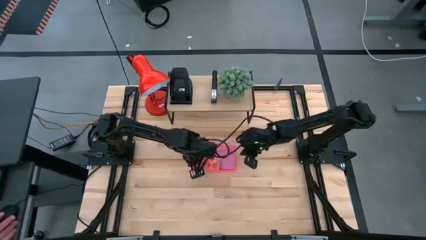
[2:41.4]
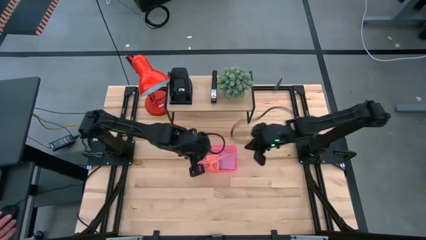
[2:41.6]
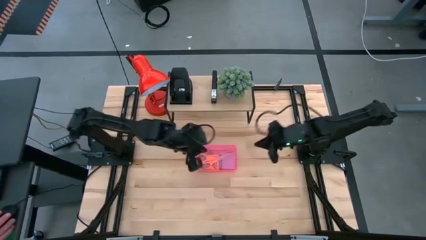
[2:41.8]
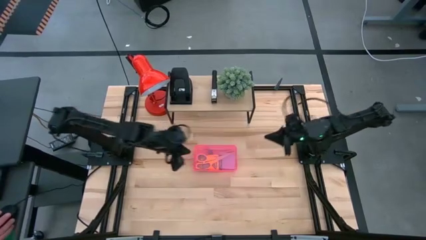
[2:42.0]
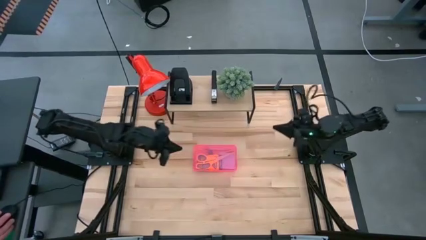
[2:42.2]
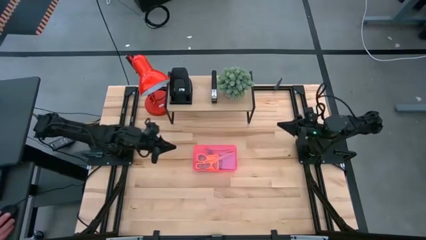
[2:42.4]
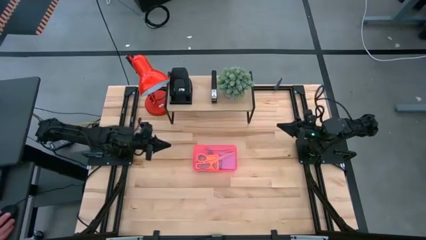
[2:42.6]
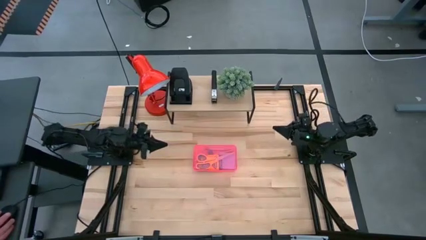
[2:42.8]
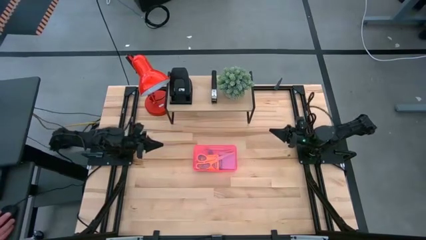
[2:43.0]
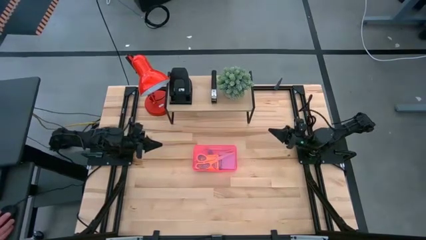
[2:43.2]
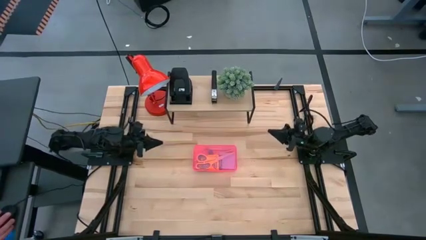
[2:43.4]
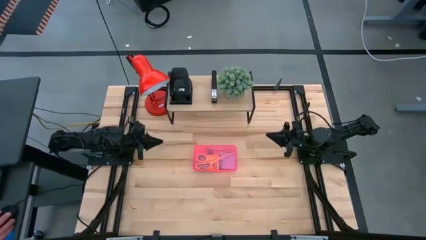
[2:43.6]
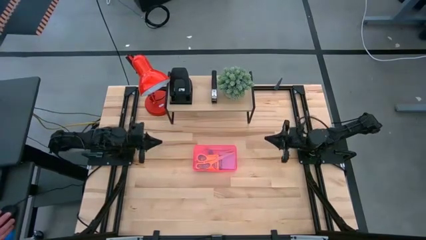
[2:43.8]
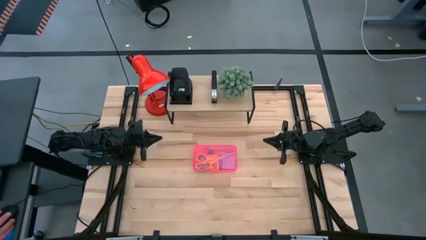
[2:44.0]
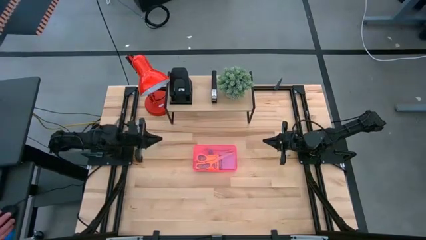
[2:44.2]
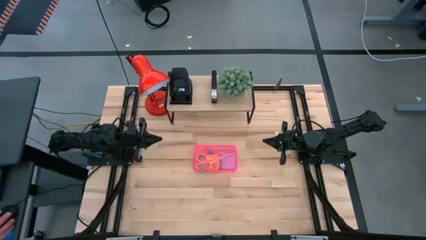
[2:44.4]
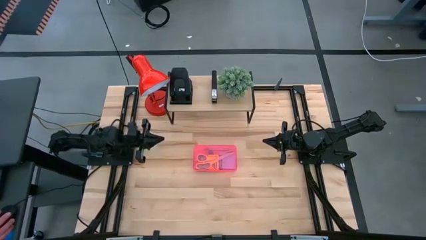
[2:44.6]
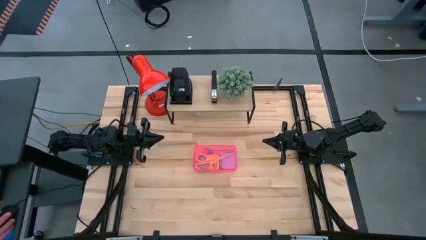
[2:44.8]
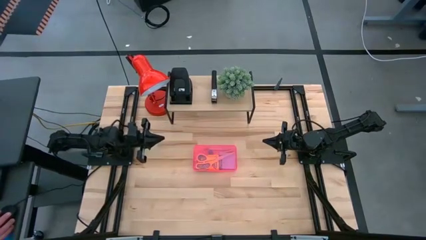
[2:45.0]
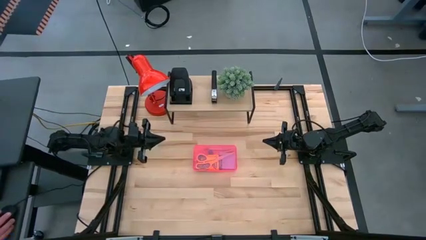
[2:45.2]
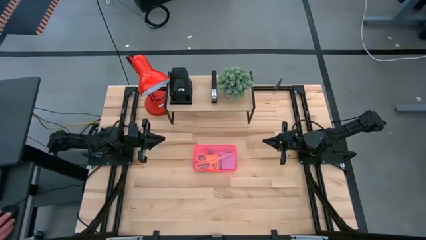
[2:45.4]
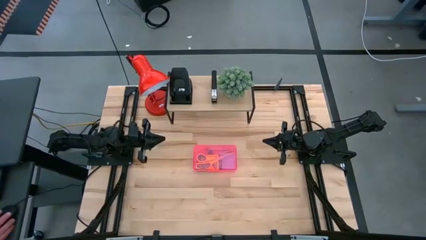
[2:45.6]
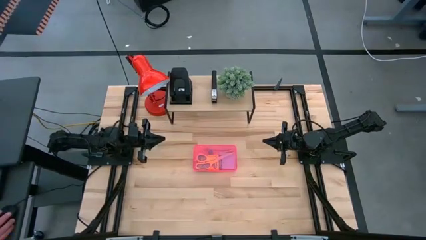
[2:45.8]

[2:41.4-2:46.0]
Task: Pack school essentials
Return to Home Position

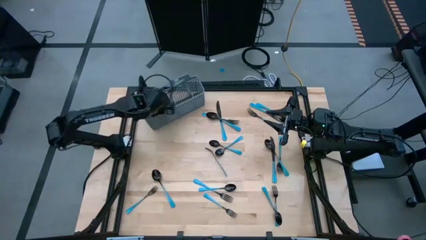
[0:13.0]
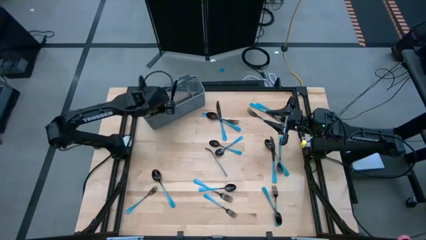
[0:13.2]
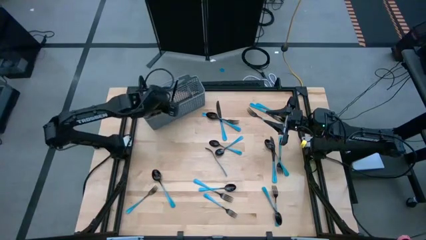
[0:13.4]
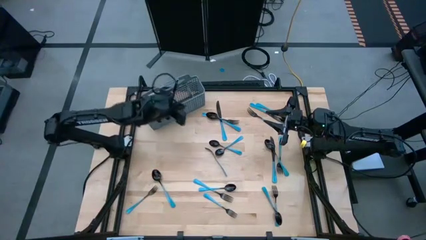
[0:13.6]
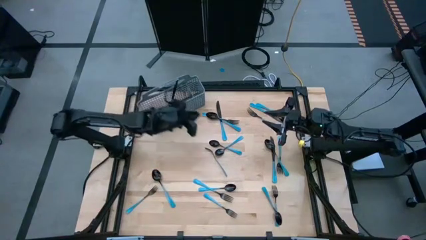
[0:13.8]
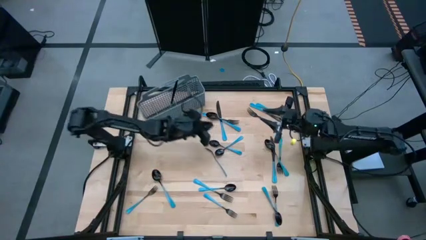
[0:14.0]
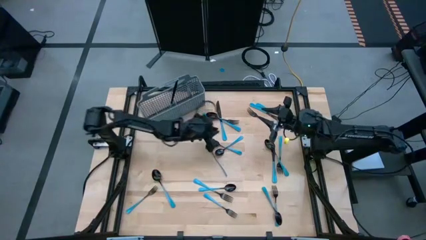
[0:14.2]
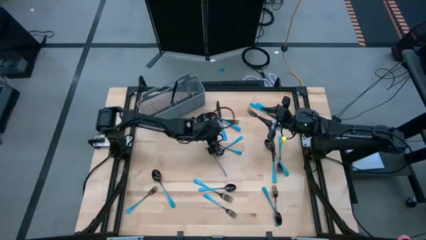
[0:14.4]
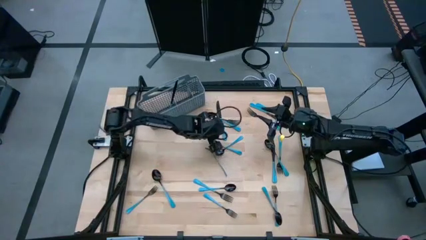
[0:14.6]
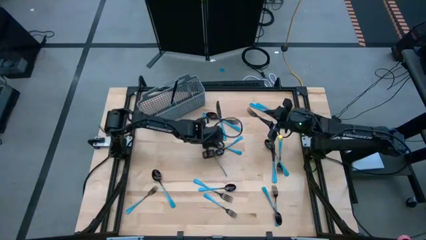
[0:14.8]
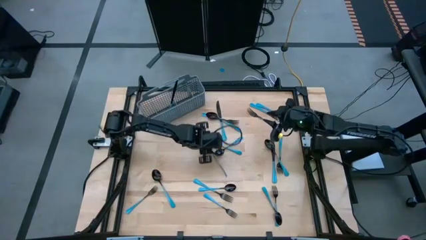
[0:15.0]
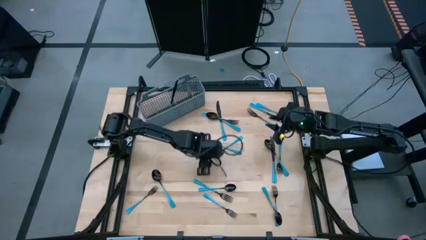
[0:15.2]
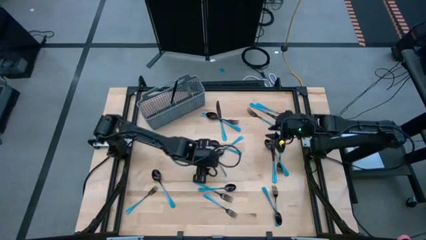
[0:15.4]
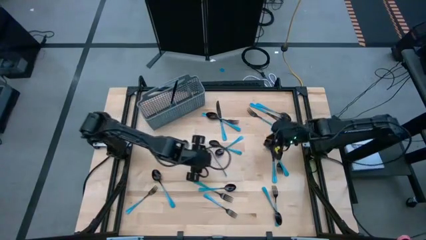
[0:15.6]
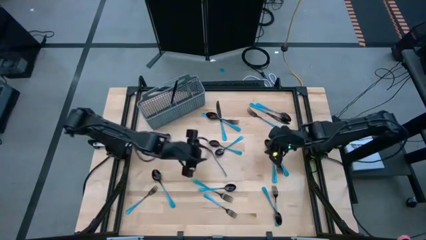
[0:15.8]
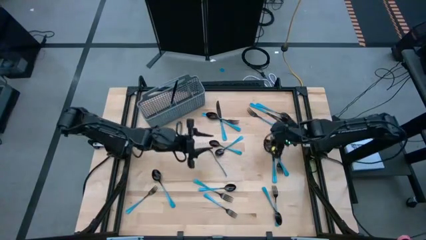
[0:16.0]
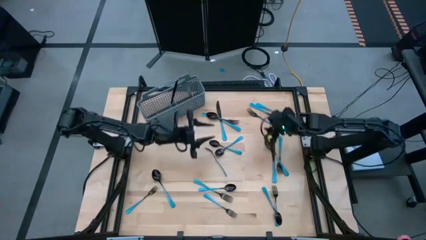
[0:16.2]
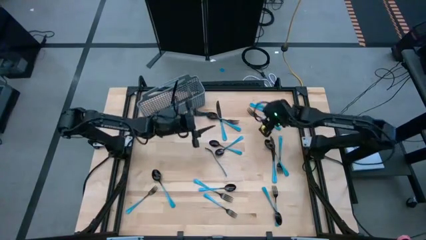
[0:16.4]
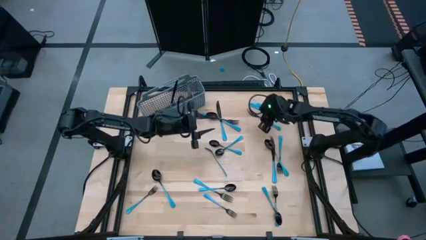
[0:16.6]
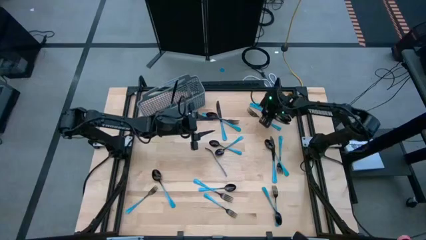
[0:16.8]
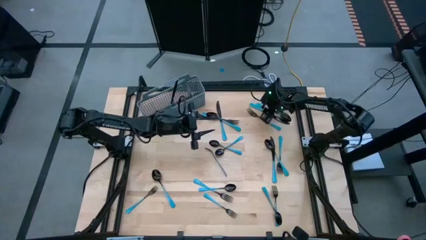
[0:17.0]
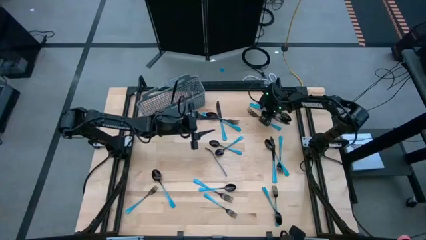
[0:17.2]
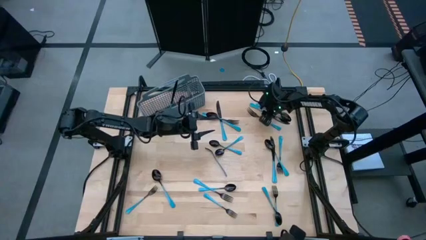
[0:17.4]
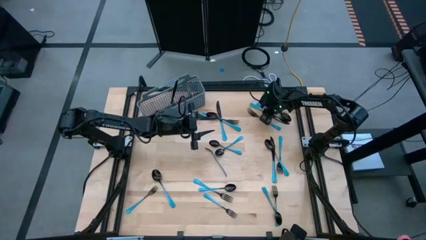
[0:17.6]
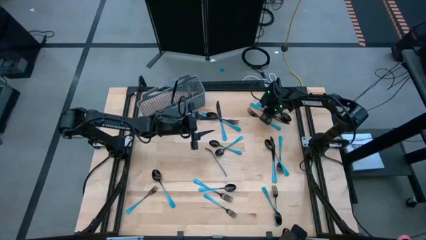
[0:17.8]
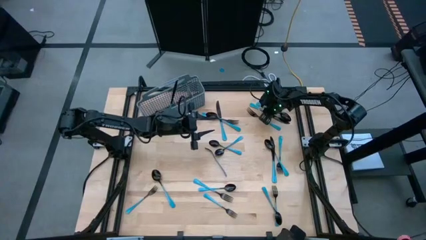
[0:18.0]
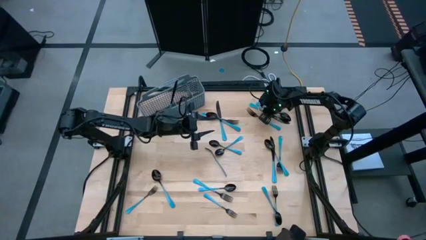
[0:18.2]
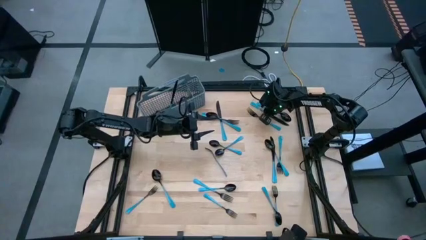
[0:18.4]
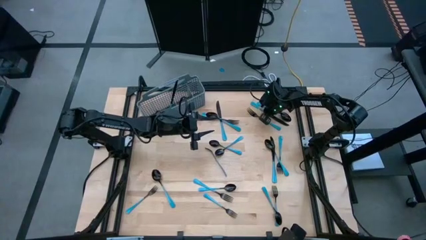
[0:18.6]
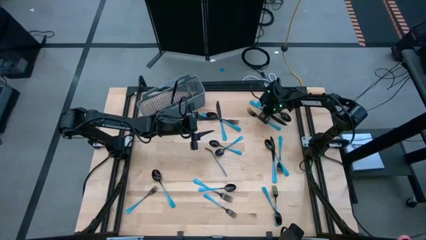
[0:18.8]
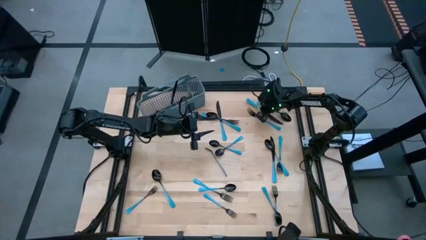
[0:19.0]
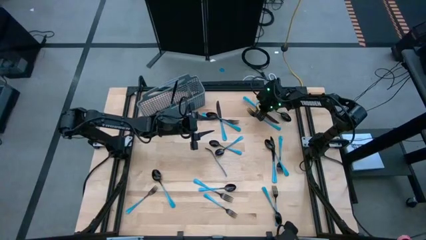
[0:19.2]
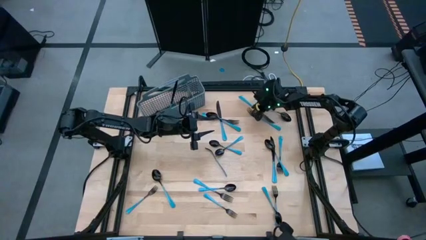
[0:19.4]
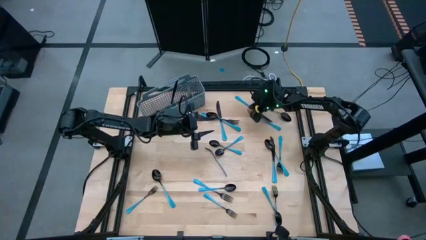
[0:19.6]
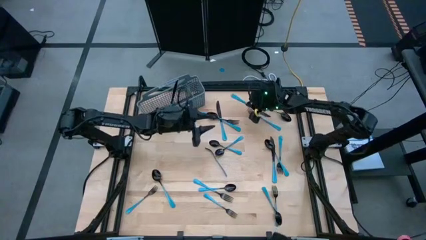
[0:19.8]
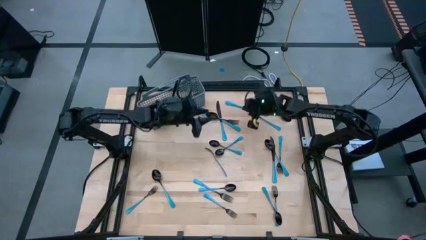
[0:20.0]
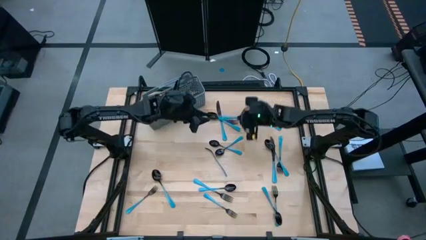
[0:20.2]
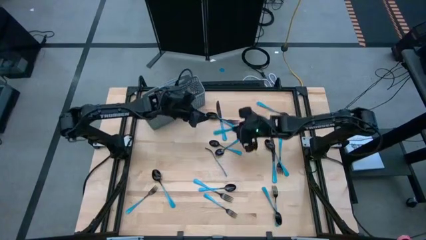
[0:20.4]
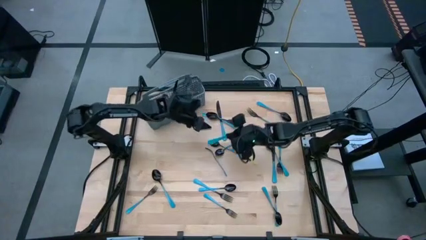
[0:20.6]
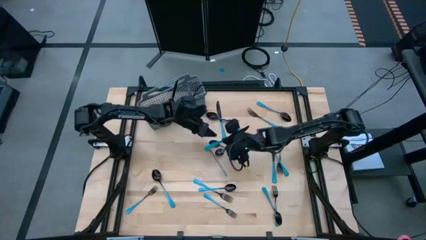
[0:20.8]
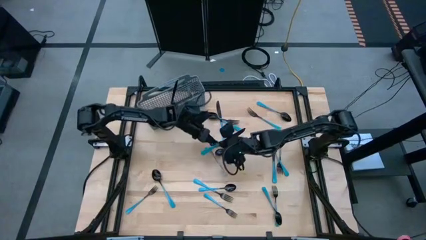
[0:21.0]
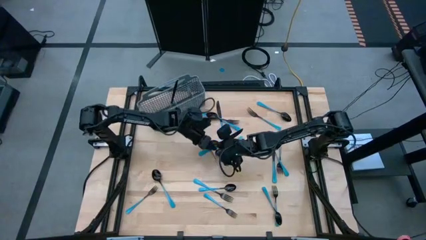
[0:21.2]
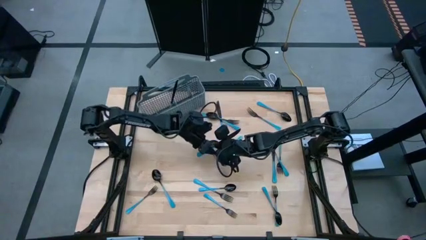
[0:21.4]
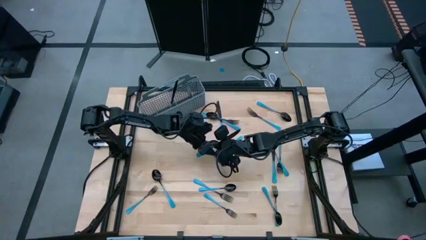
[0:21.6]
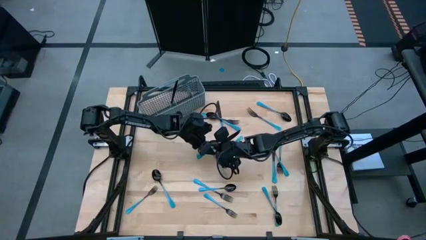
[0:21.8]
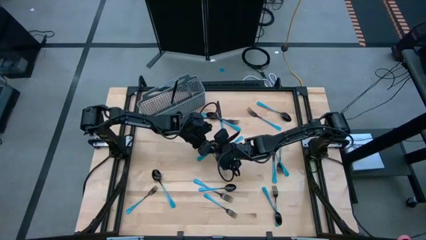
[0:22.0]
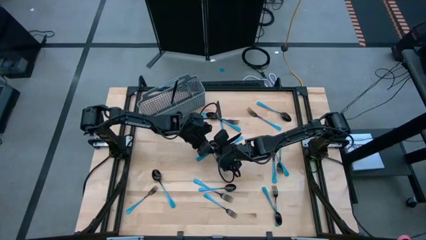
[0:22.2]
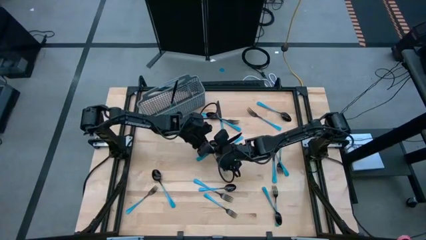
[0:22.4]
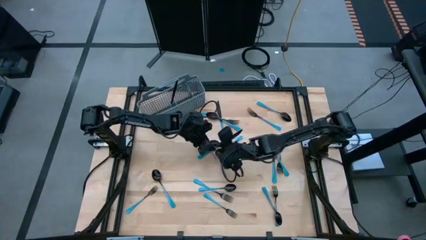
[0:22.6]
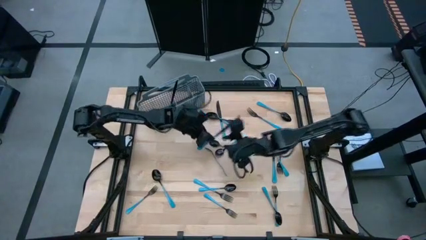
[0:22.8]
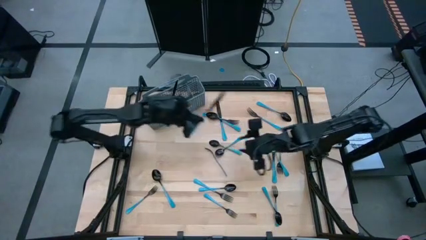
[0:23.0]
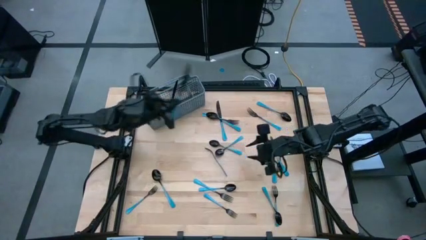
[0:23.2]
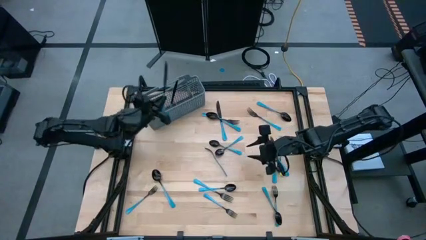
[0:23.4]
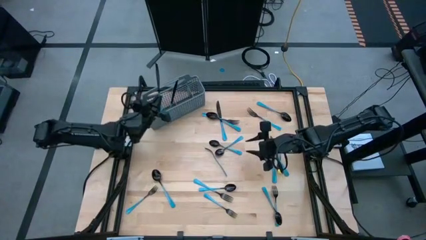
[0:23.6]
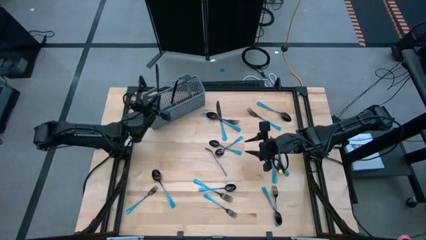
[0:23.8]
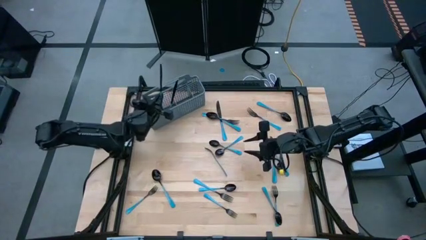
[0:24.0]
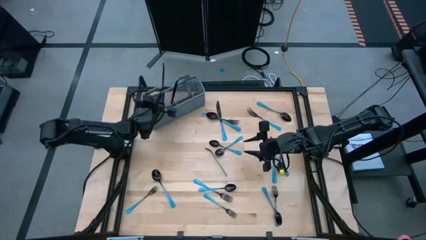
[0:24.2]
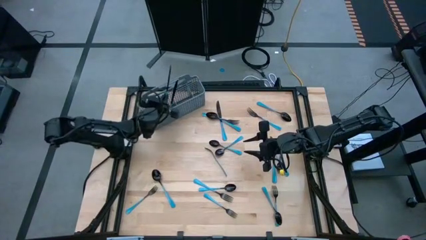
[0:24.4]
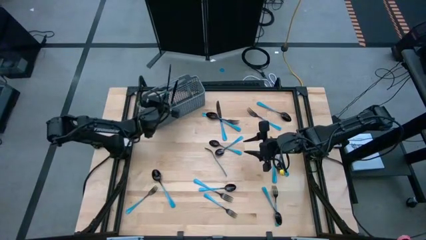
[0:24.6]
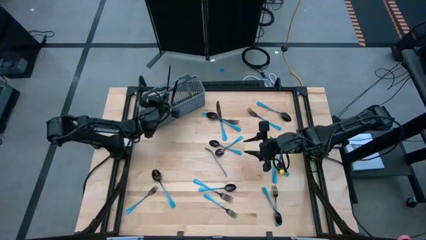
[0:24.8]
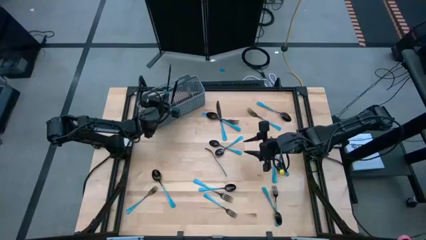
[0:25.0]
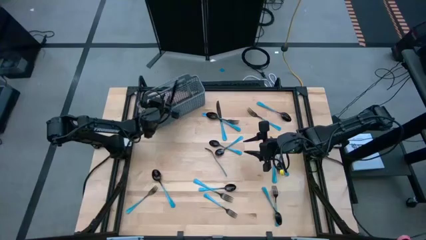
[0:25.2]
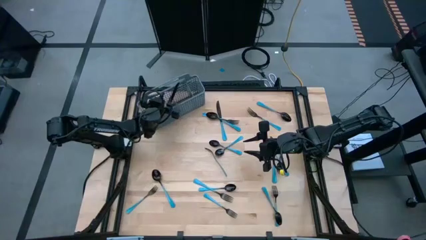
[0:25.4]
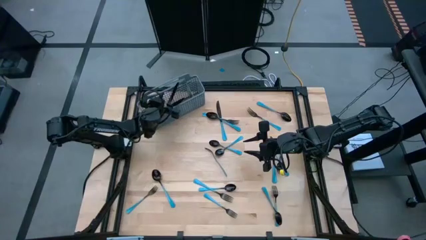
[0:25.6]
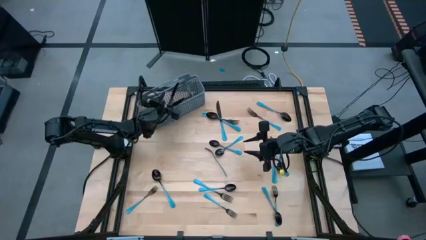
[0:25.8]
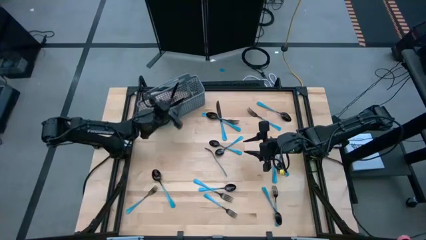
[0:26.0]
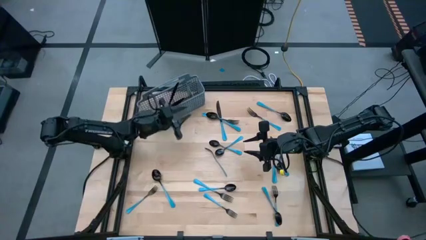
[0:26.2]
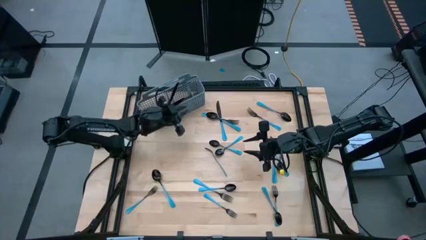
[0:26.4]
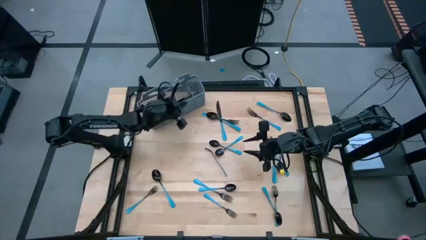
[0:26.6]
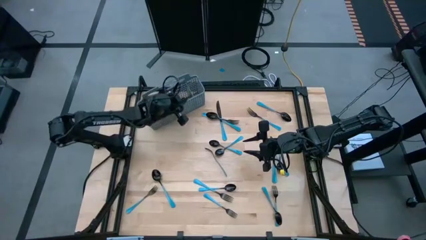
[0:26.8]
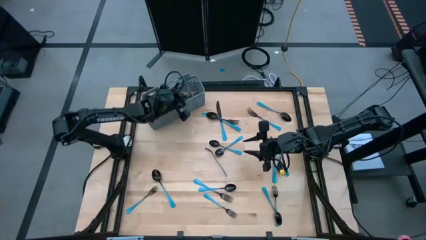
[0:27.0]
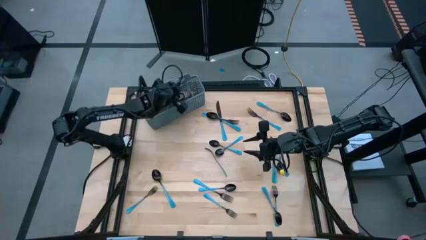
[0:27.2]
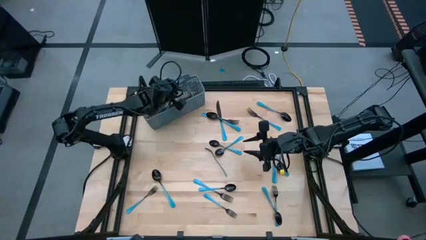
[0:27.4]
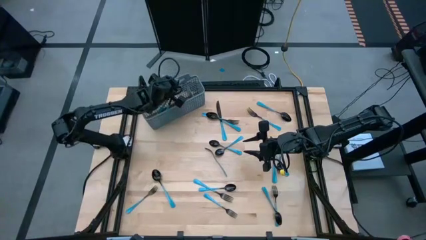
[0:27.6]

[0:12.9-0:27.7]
Task: Sort silverware
Put the blue knife into the silverware rack
